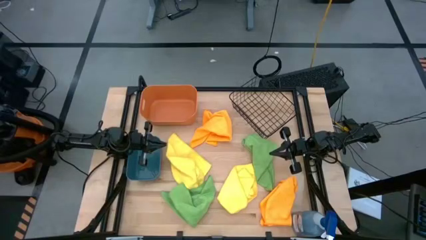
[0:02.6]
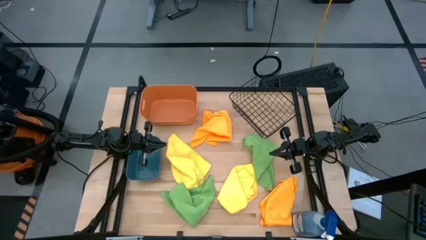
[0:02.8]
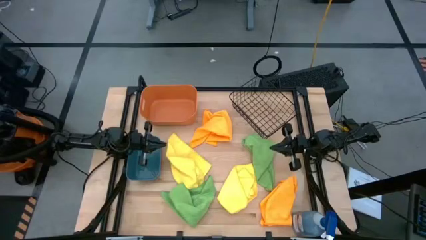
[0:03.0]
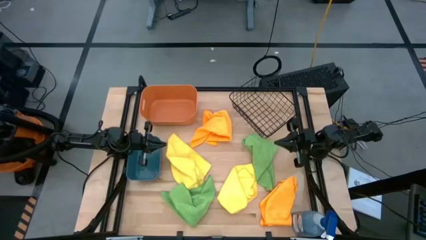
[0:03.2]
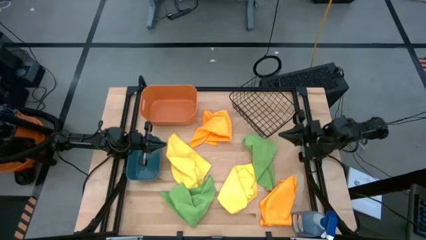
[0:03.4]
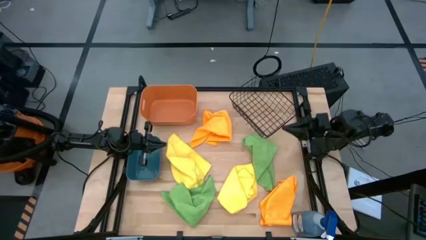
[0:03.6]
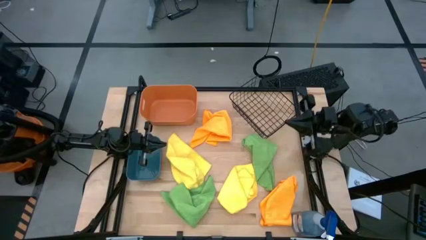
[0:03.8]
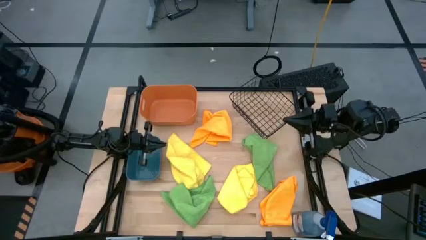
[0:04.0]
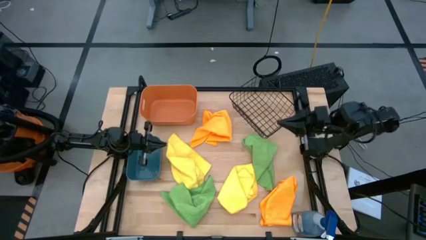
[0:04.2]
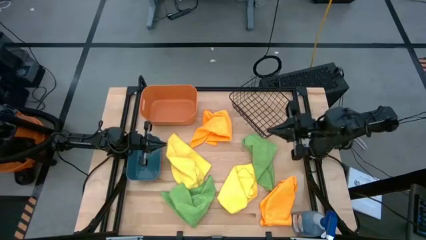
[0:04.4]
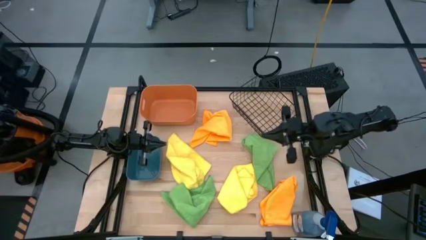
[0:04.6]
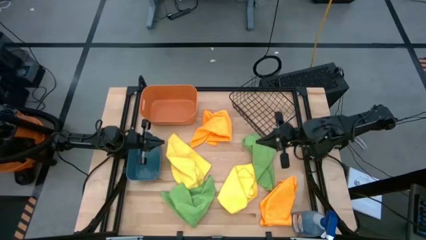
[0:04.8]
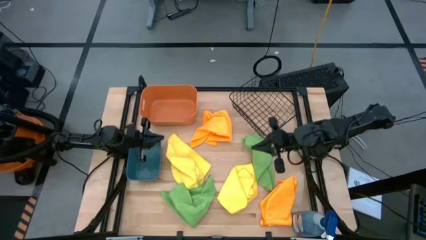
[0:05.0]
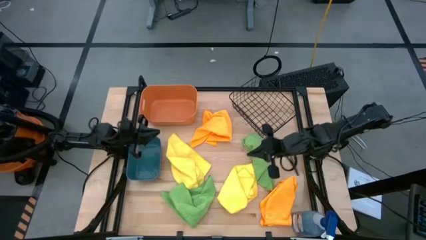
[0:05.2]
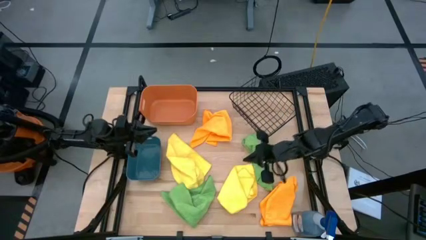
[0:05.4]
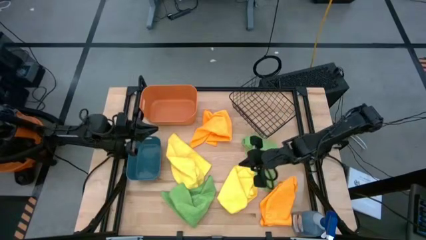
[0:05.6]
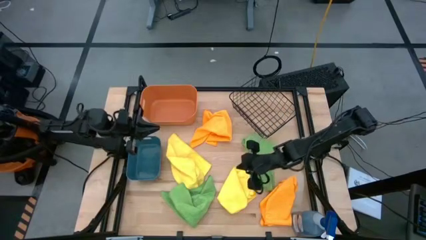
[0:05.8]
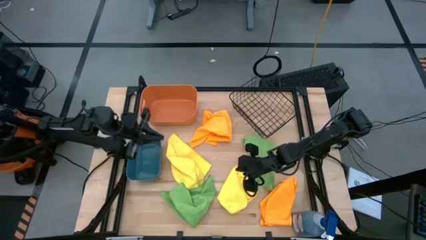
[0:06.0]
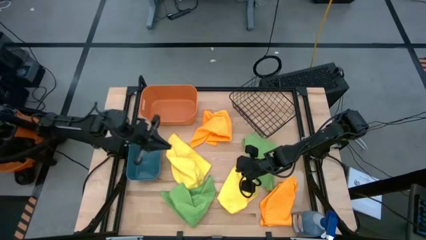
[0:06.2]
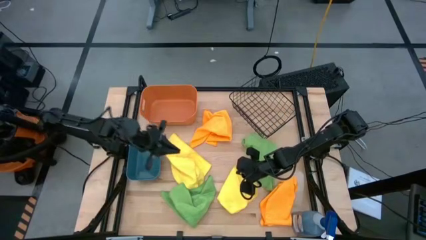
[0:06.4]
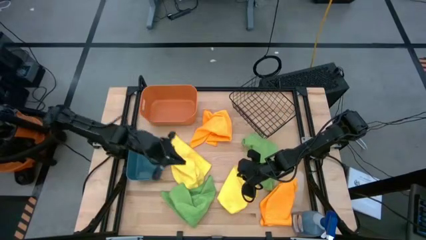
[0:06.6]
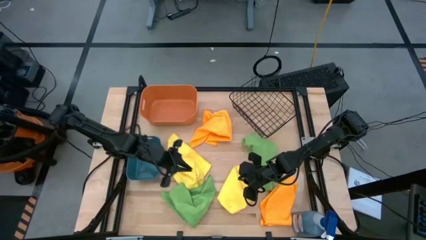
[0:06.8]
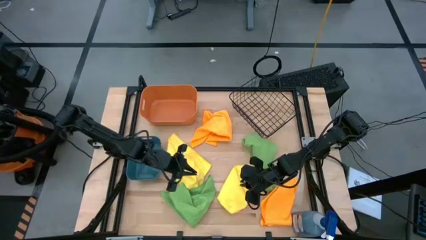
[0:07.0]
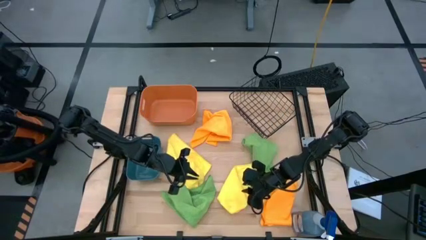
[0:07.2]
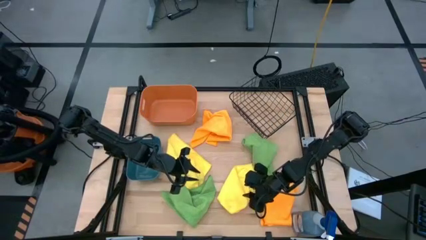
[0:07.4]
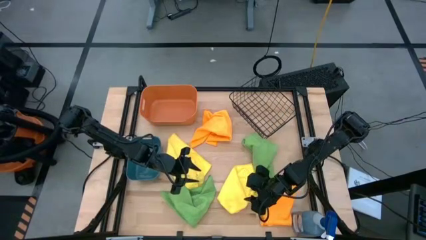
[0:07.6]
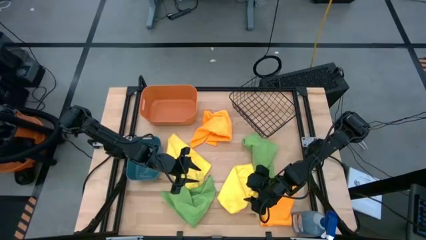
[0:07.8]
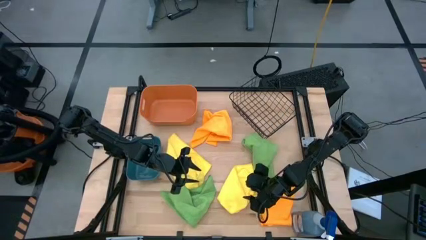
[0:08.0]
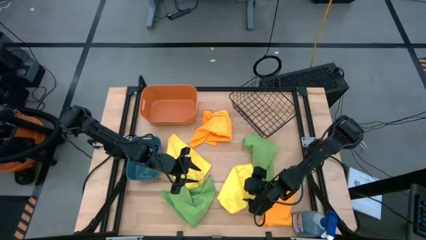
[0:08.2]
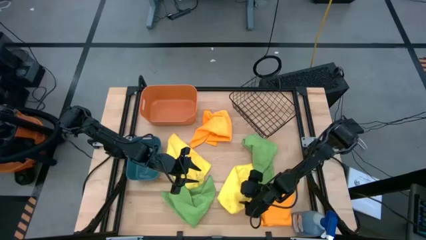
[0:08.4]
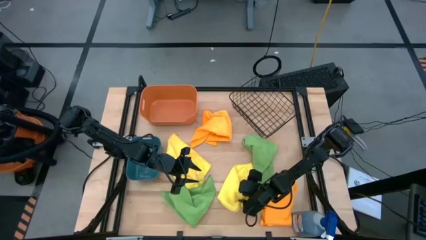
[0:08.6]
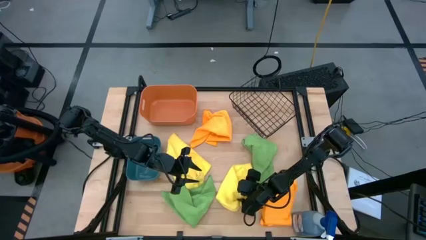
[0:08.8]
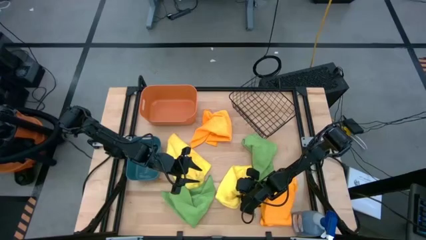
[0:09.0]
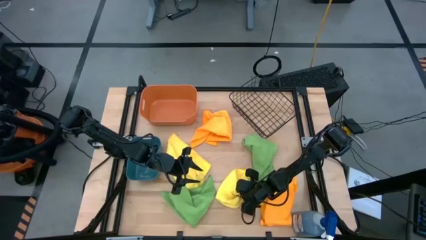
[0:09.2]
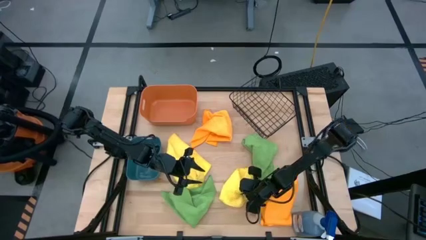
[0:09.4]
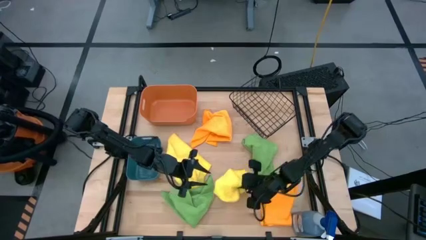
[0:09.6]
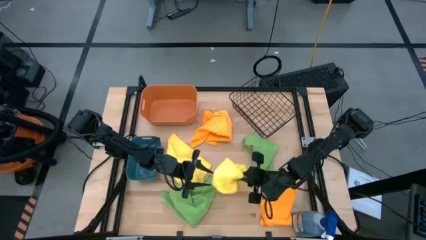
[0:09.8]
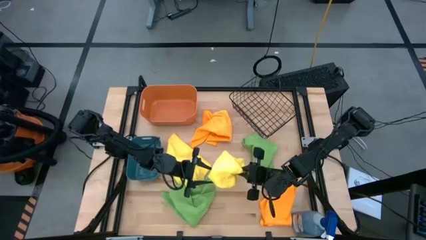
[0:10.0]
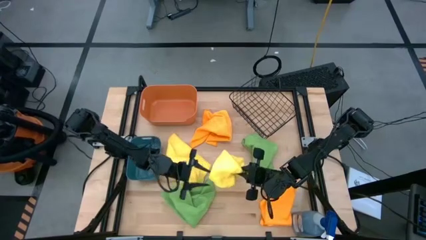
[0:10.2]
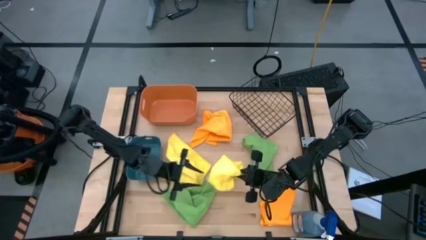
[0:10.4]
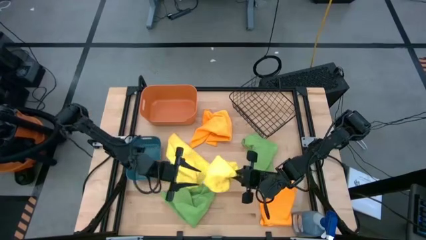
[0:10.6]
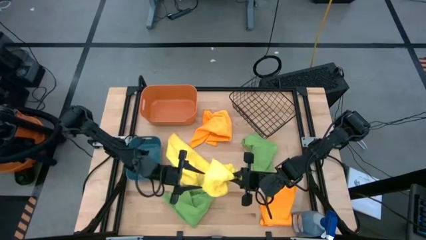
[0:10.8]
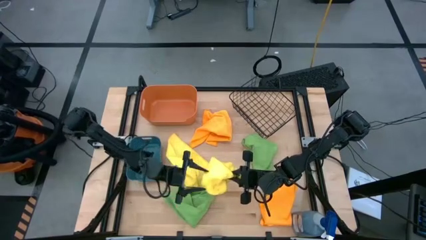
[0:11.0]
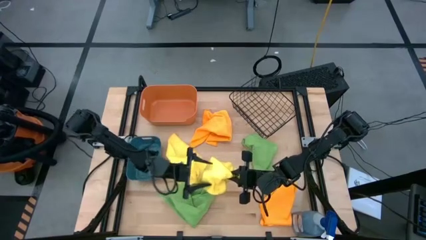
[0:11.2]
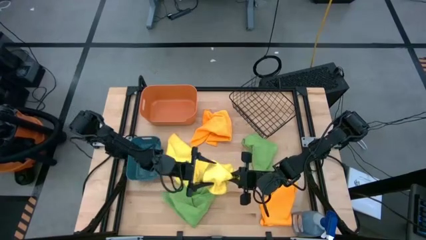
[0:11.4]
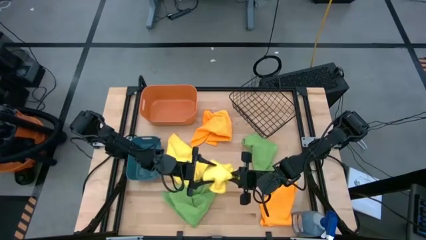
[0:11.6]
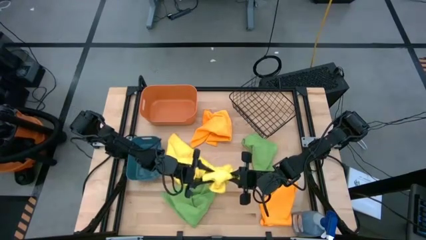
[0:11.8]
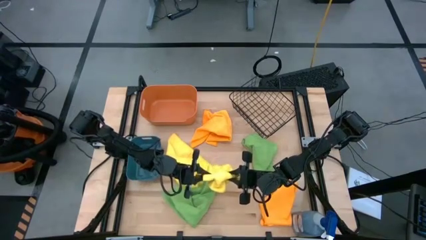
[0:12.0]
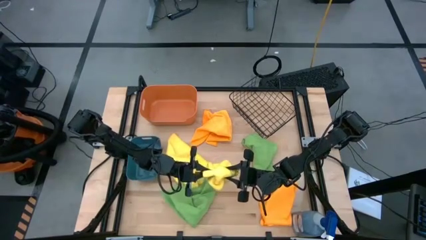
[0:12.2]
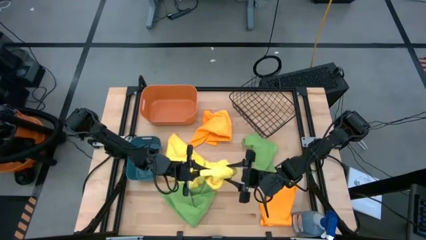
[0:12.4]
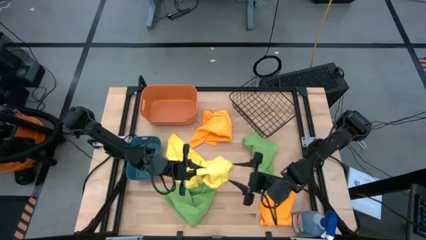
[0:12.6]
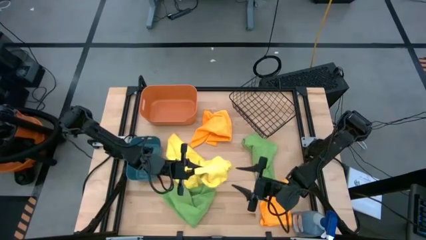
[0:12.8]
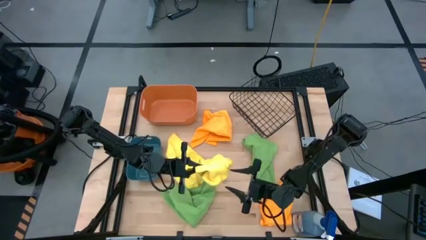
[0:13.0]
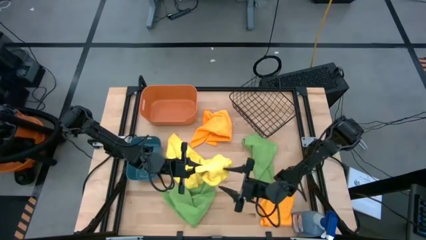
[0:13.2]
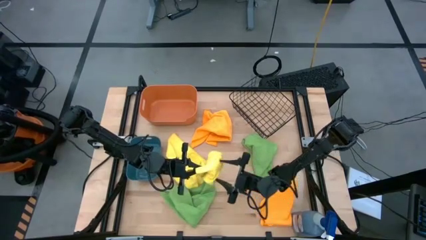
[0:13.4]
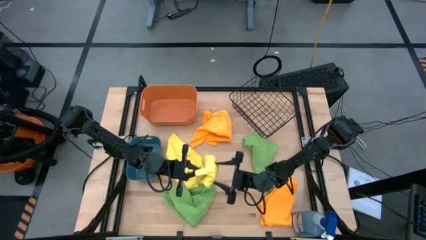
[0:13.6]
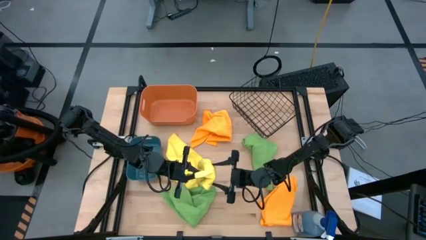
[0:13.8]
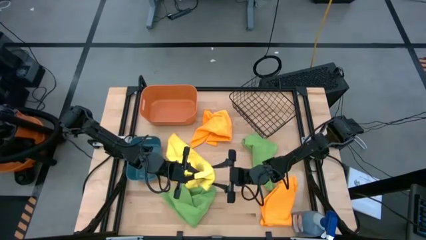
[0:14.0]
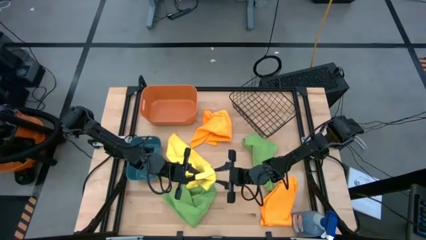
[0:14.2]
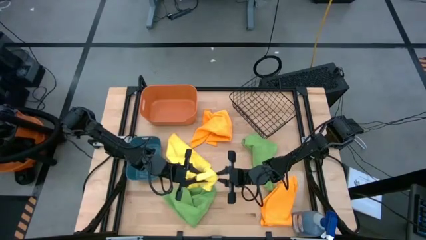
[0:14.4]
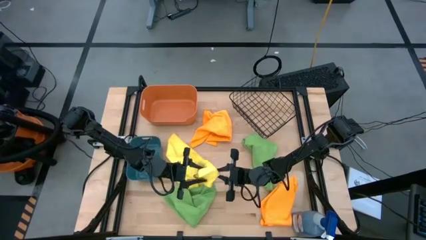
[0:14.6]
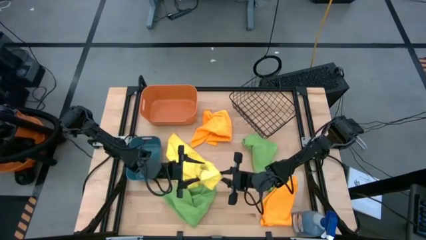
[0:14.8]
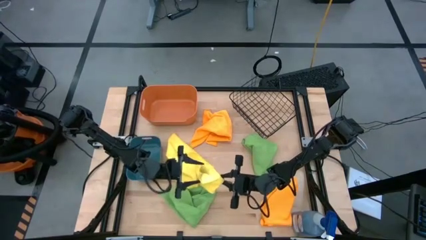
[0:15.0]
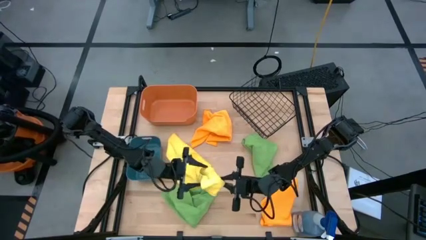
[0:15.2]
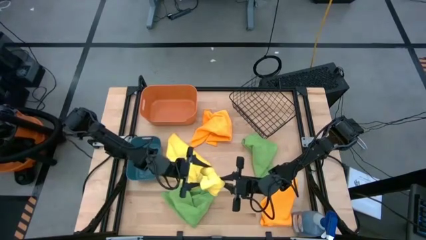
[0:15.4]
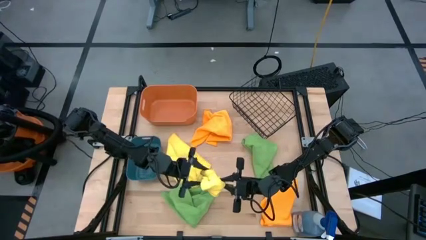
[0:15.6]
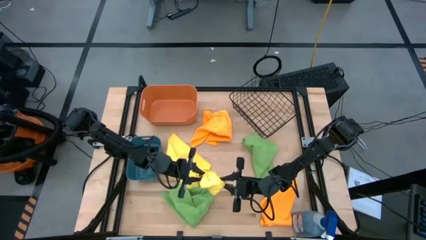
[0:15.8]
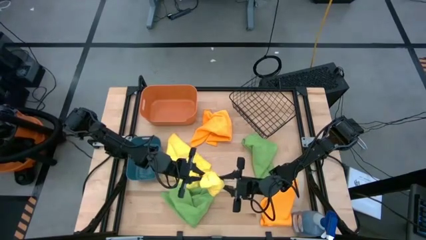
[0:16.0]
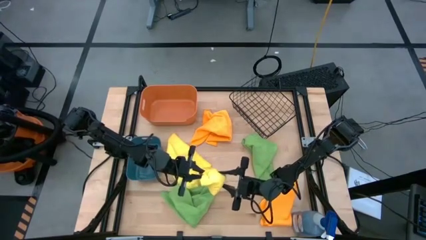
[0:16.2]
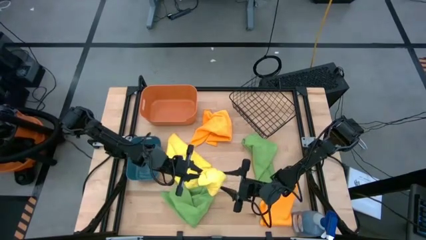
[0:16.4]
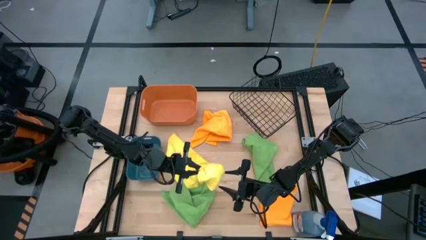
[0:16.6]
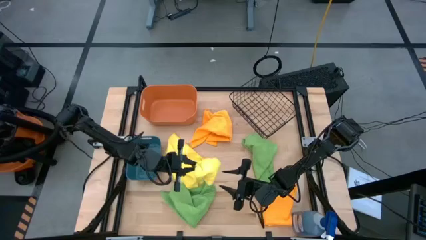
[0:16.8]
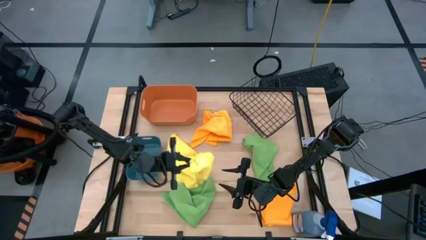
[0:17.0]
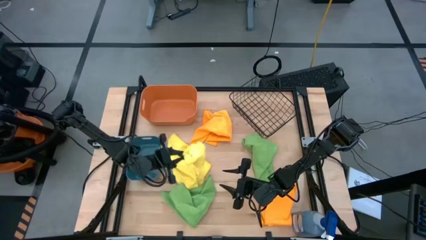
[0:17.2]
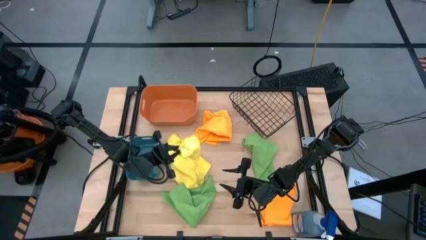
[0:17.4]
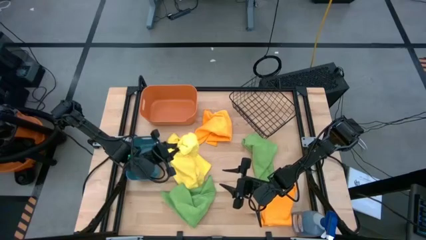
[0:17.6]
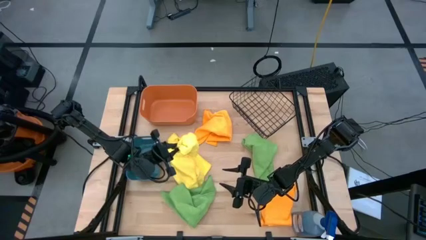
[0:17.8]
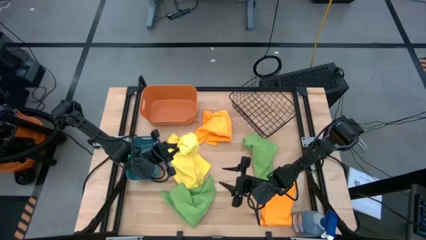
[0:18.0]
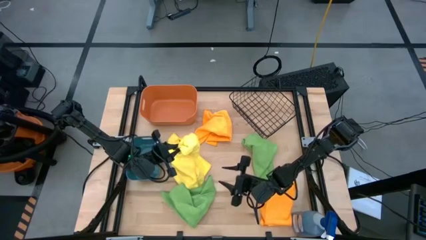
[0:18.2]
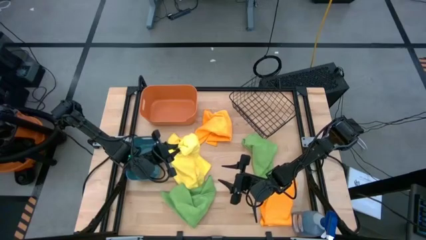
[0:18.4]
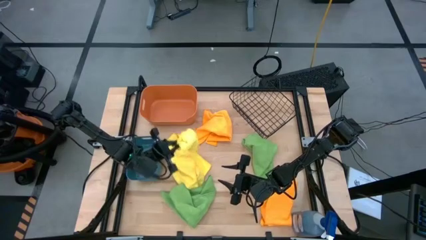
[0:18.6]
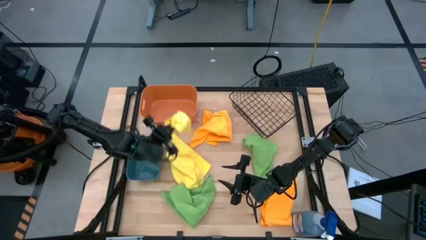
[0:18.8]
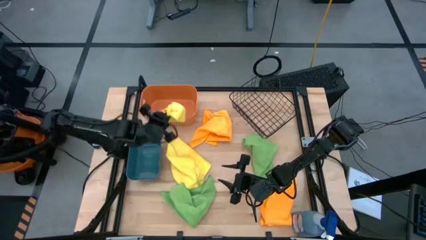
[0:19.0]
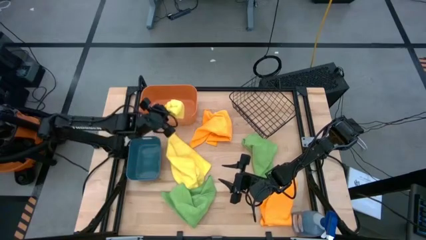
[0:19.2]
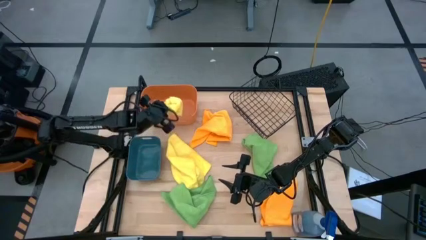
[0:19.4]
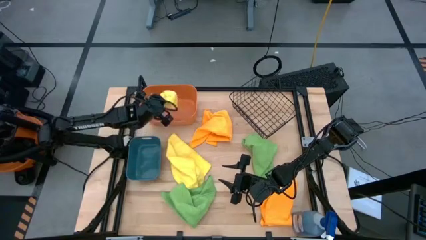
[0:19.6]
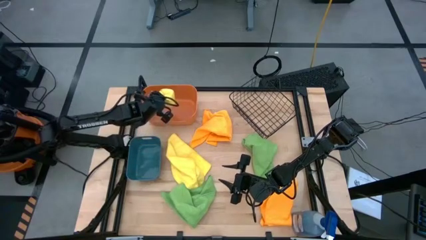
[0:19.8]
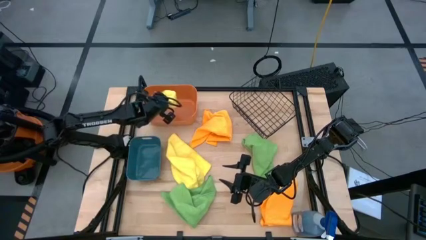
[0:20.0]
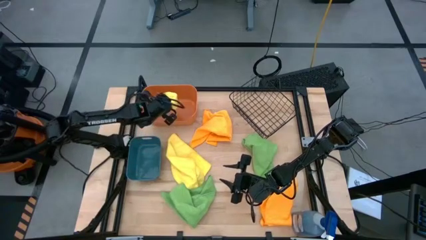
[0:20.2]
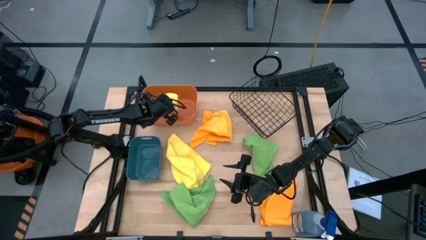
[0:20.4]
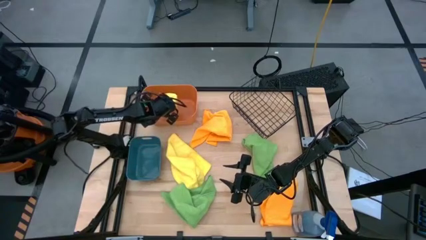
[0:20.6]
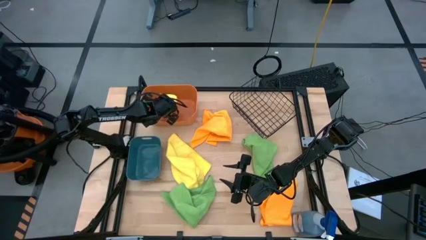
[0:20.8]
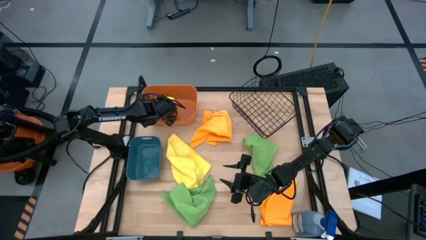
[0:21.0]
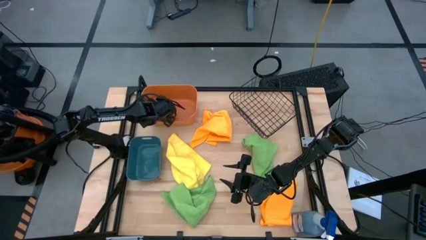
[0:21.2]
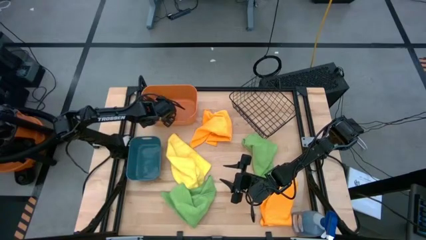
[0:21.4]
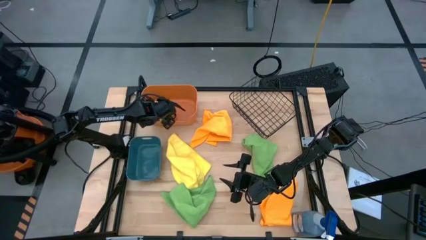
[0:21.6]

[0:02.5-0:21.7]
Task: Sort microfiber towel by color & place in baskets
Put the right yellow microfiber towel into the orange bin
